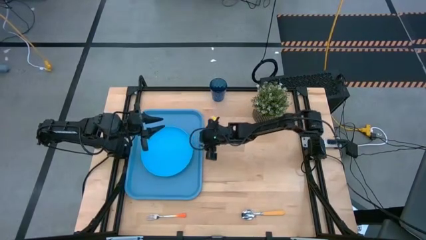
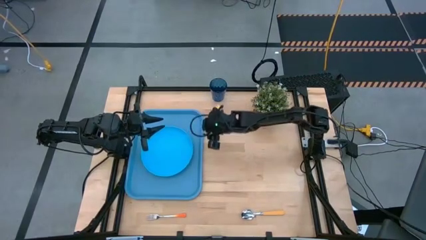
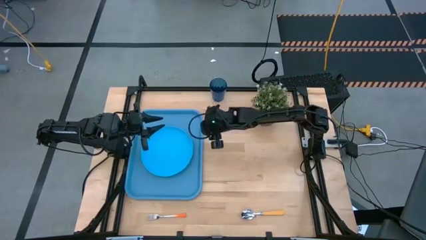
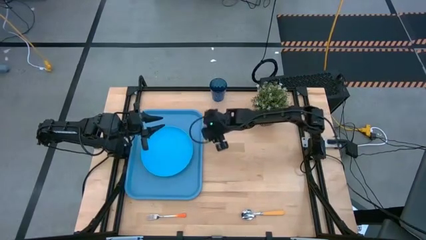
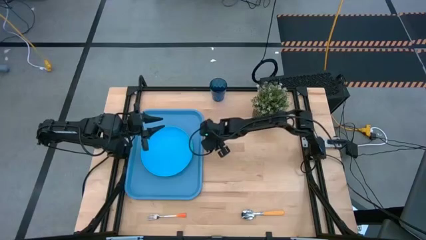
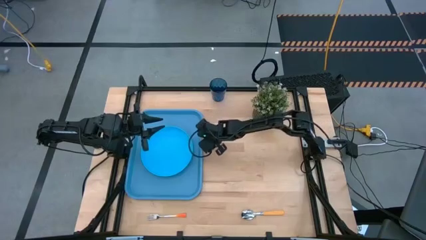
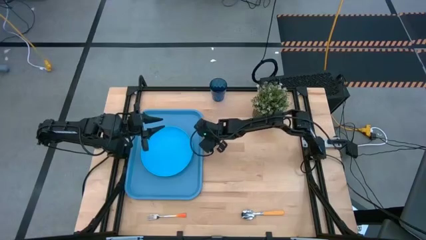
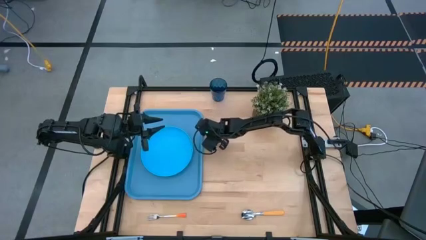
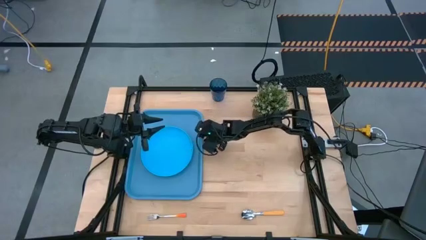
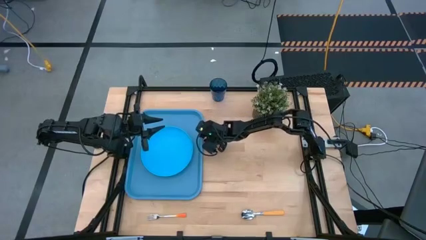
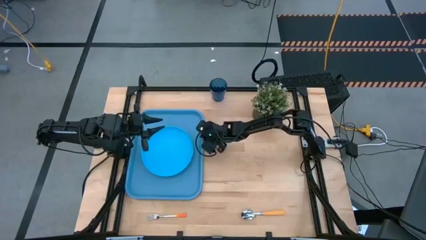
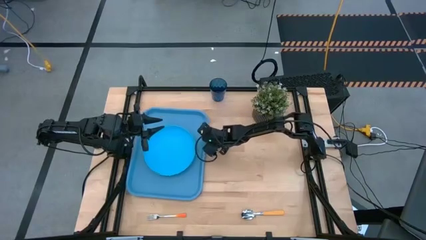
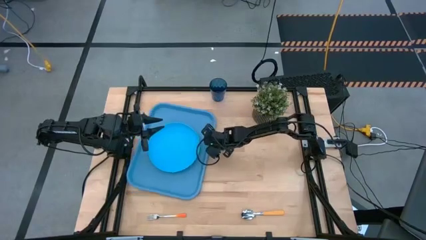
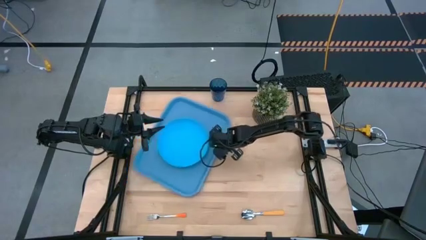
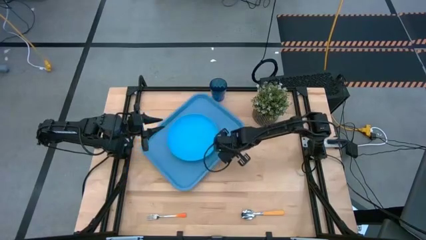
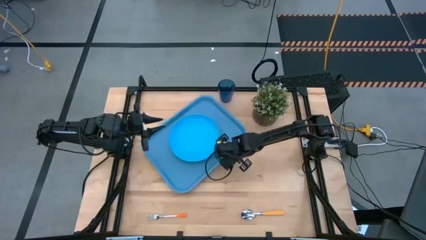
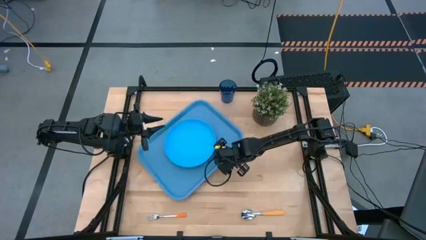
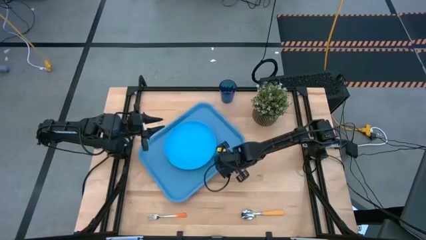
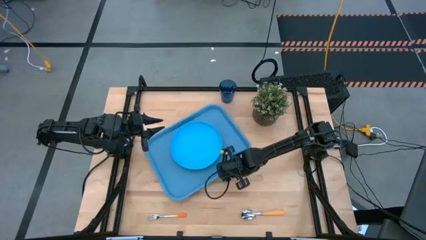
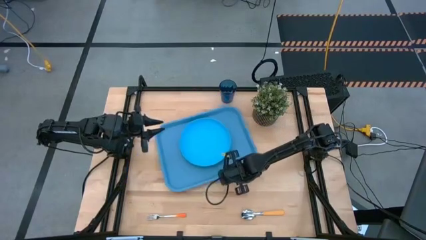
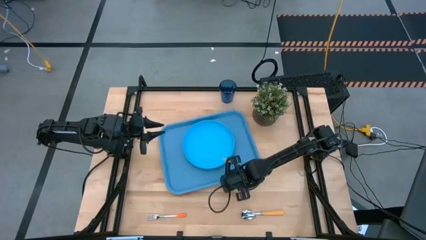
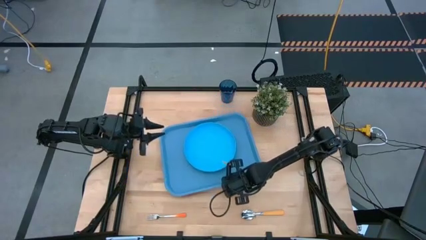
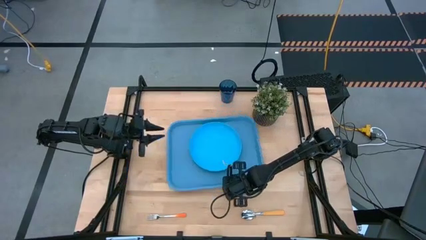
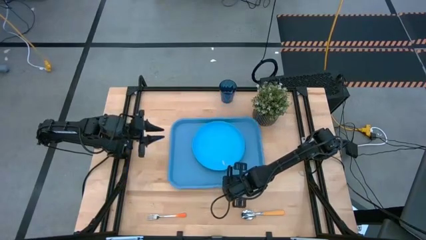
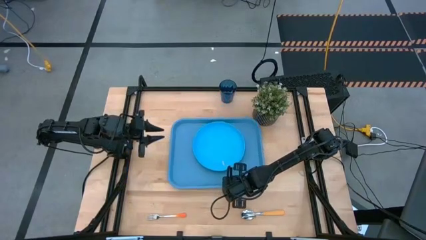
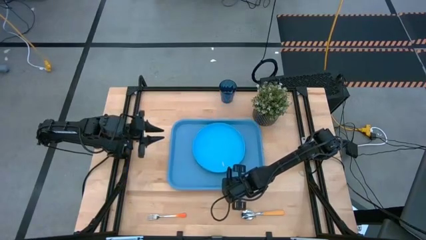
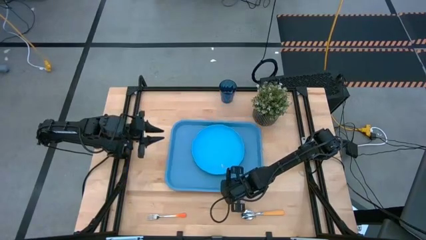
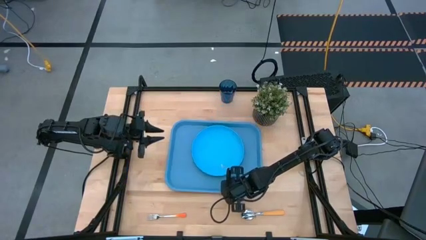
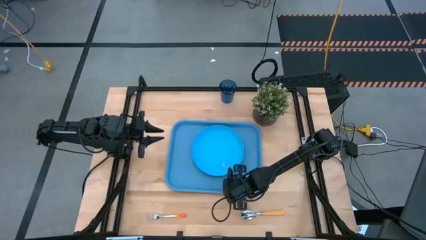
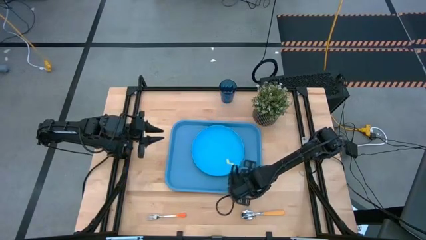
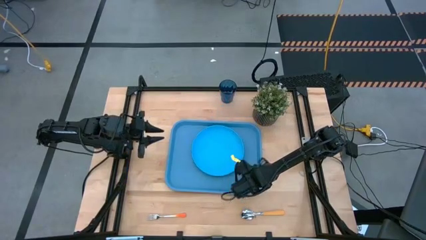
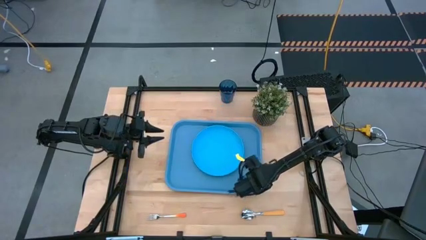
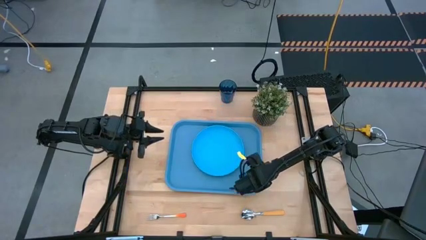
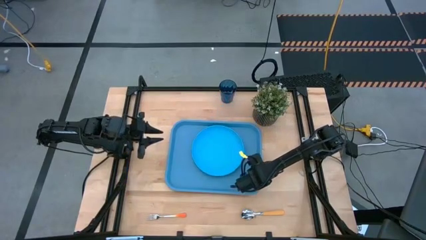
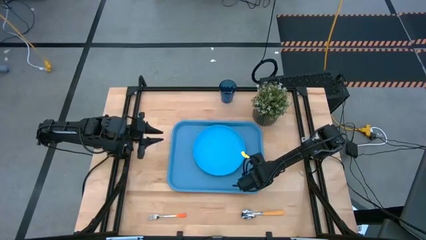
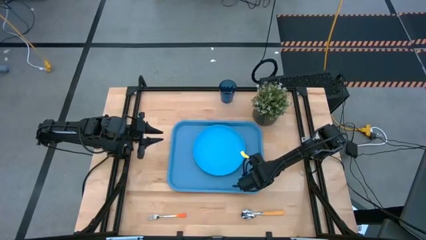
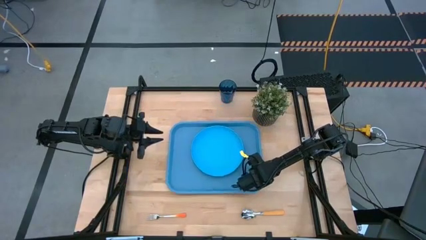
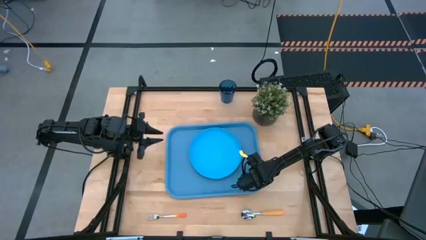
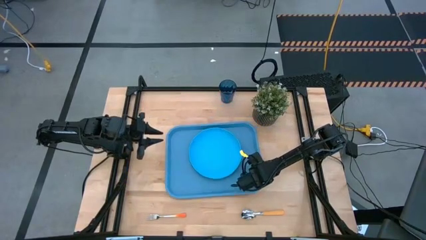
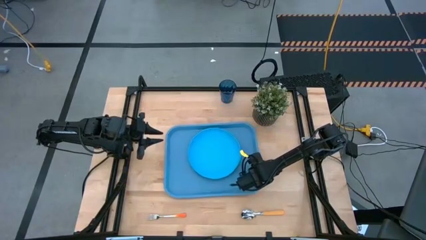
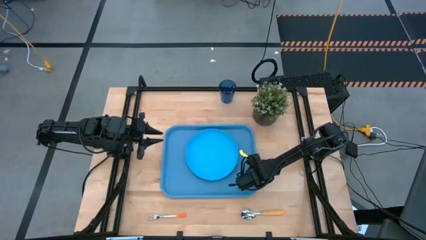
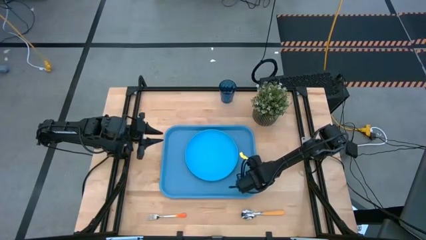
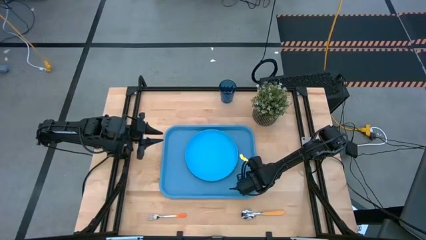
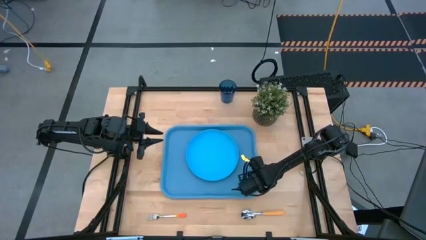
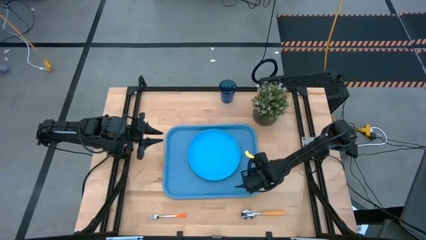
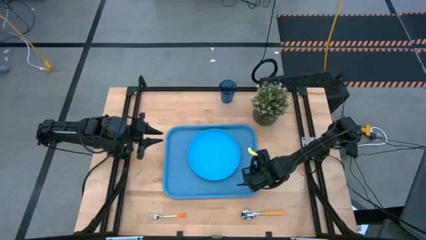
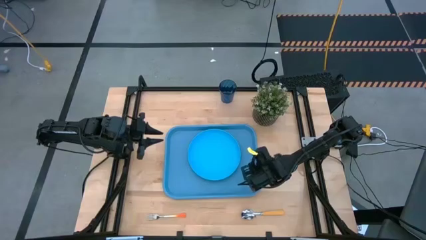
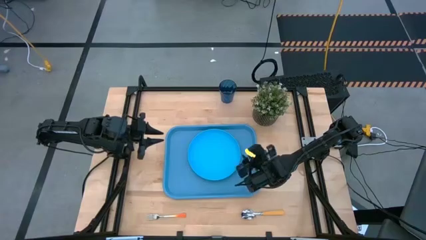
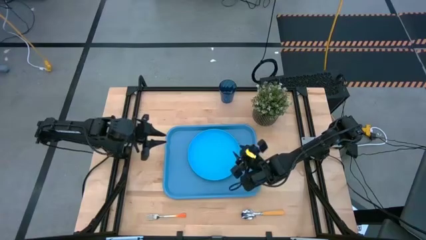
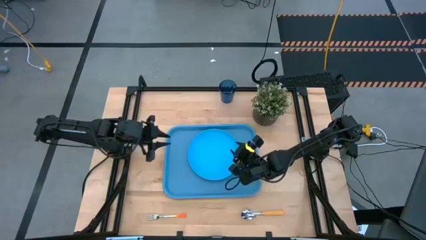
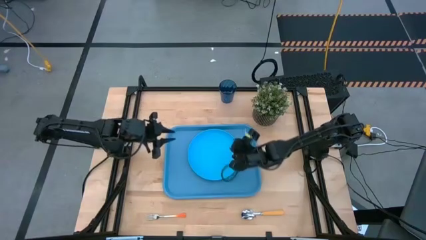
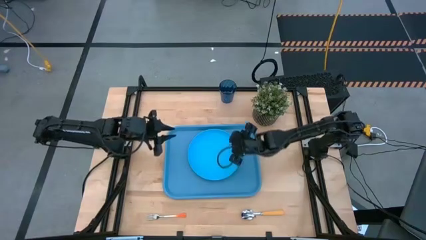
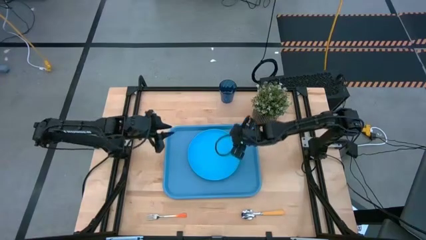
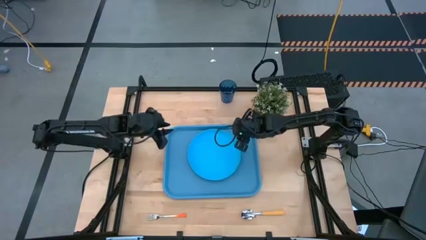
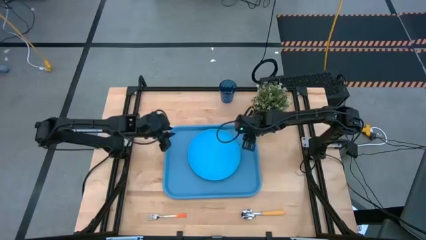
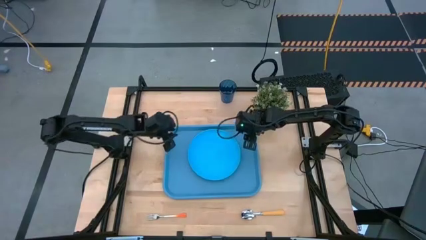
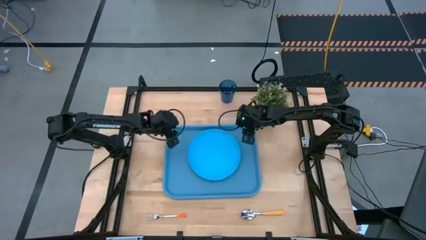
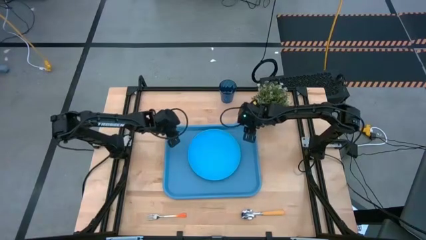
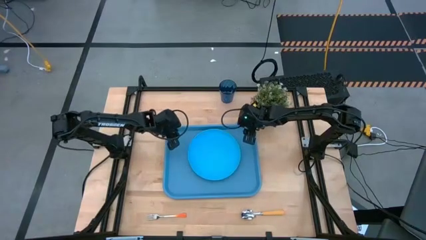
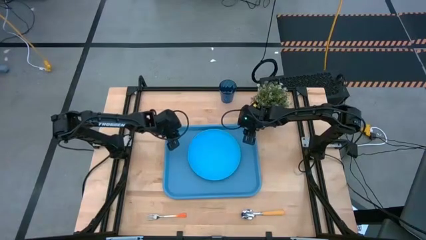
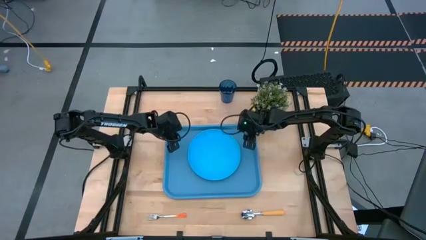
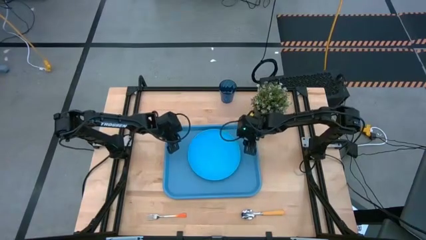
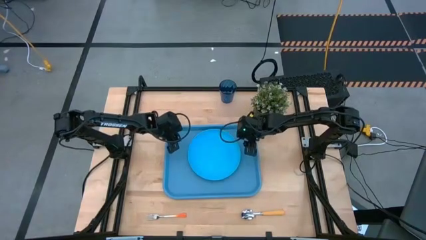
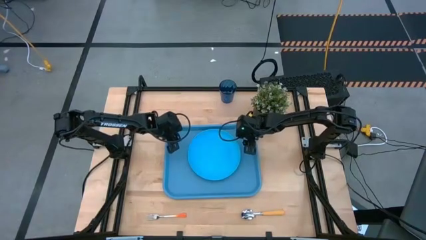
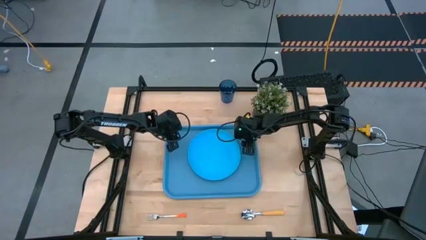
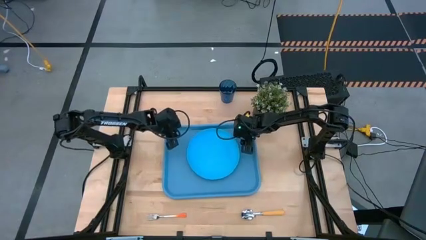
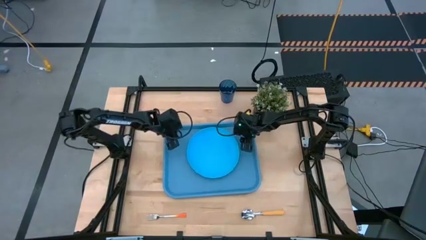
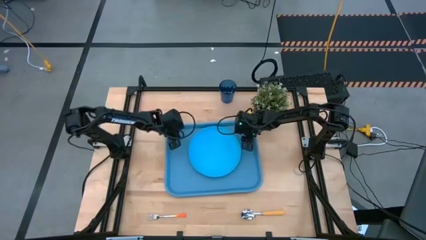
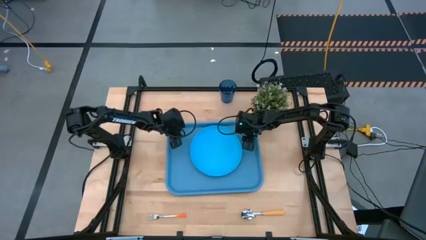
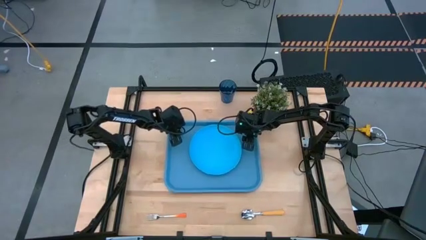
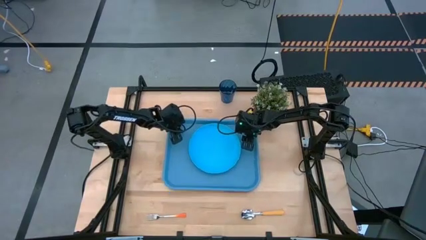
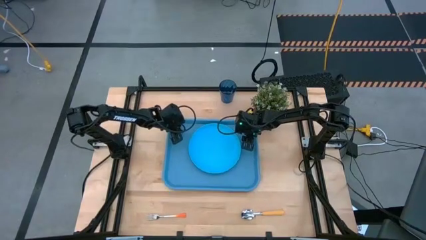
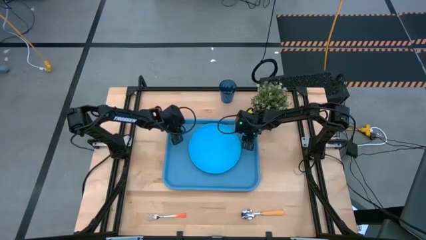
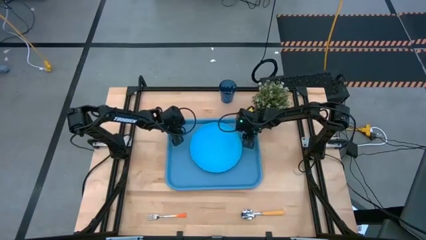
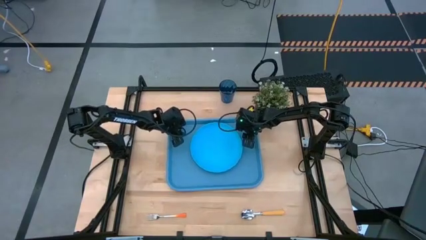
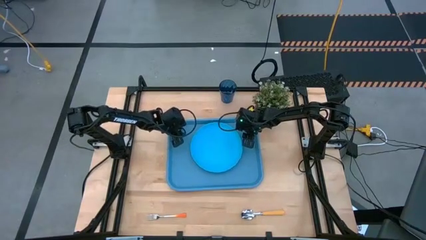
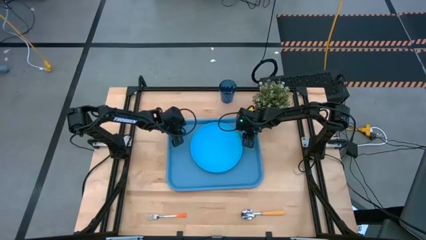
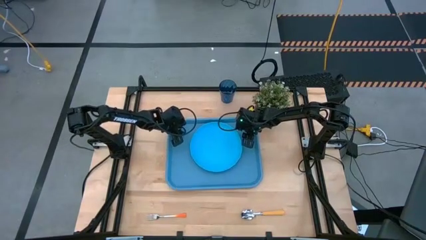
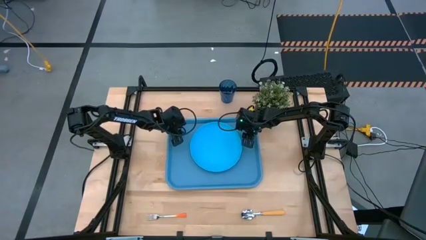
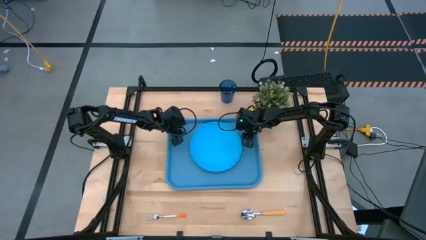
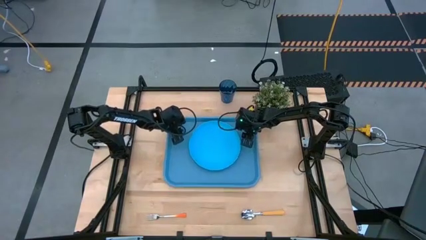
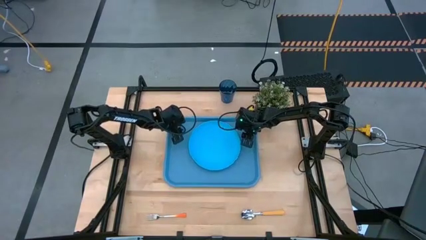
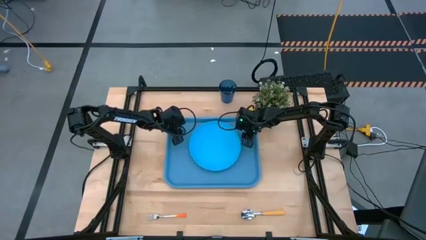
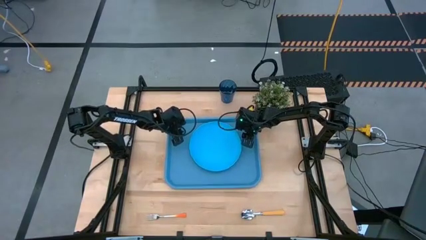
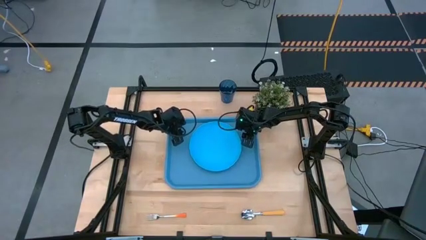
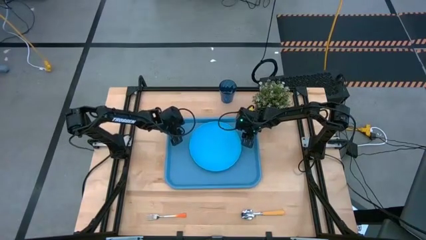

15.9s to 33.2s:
Task: Pick and place plate/cup/fork/spoon on tray
Move the blue tray to the center of the table
